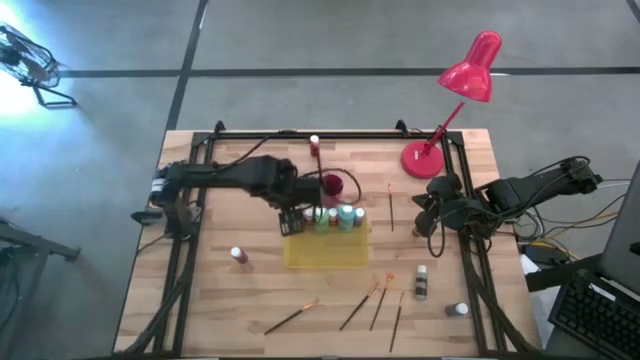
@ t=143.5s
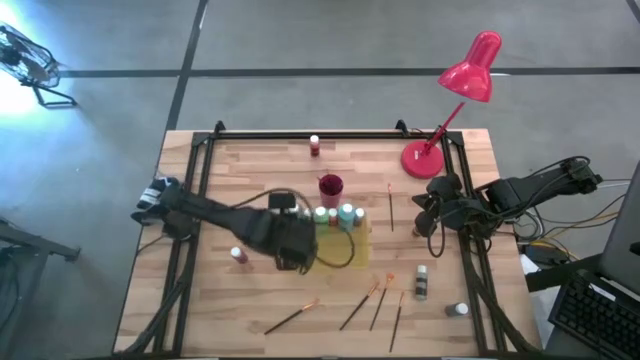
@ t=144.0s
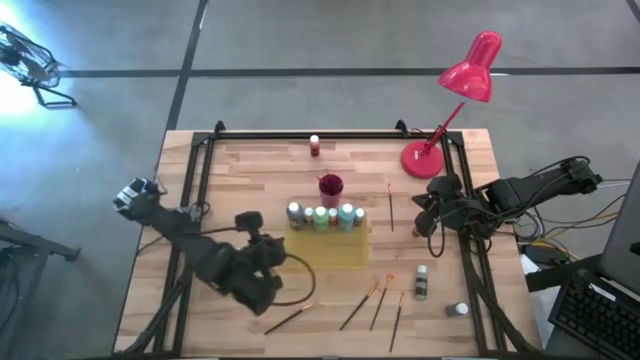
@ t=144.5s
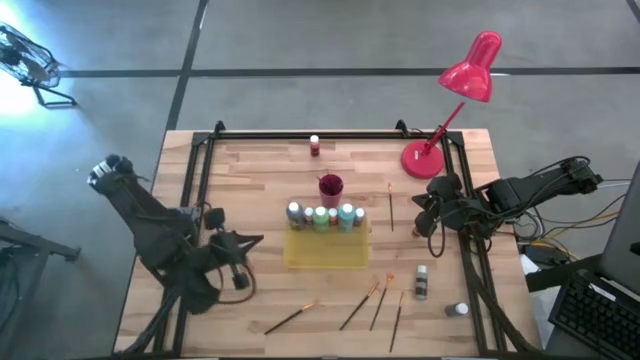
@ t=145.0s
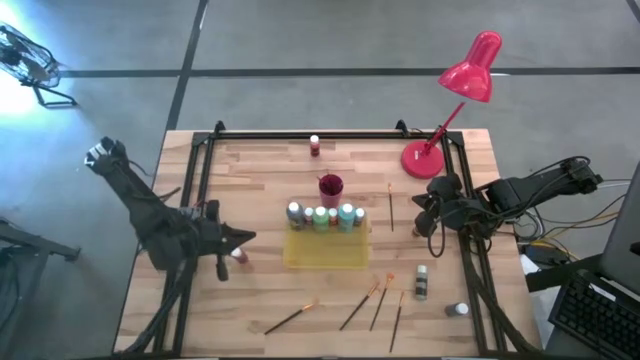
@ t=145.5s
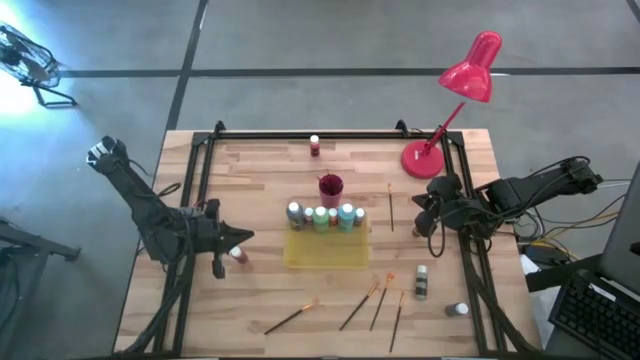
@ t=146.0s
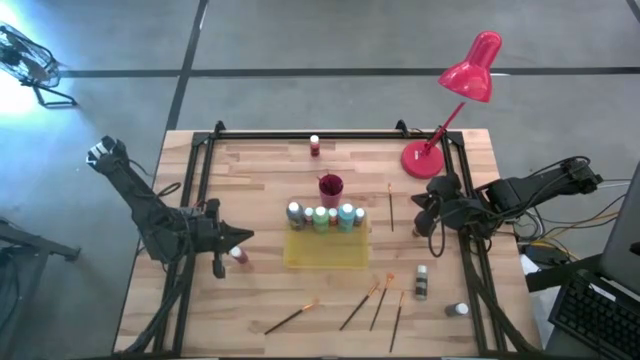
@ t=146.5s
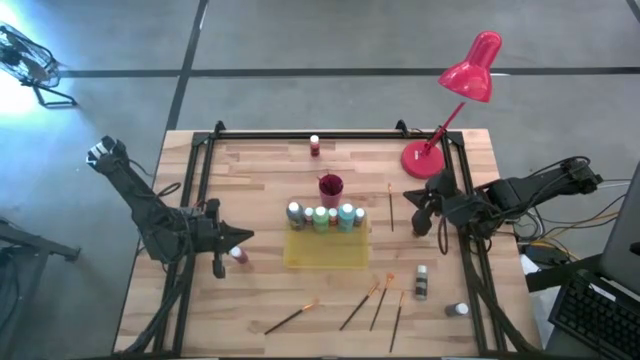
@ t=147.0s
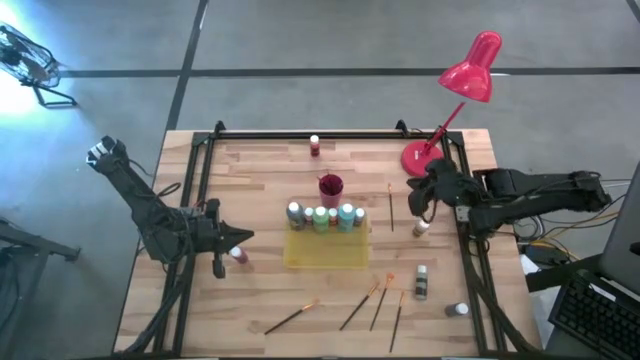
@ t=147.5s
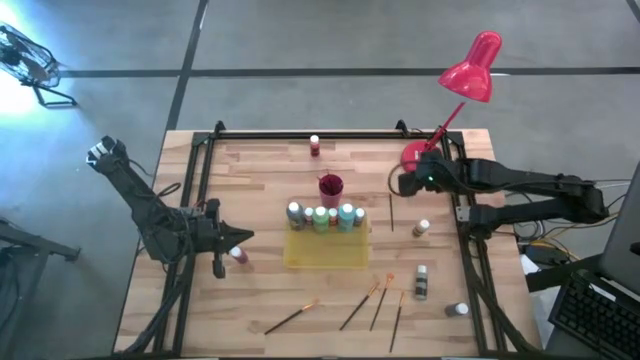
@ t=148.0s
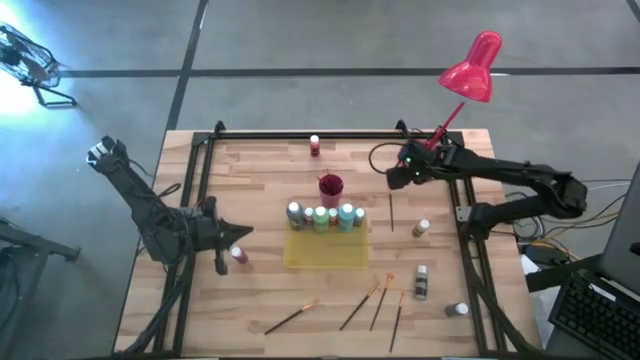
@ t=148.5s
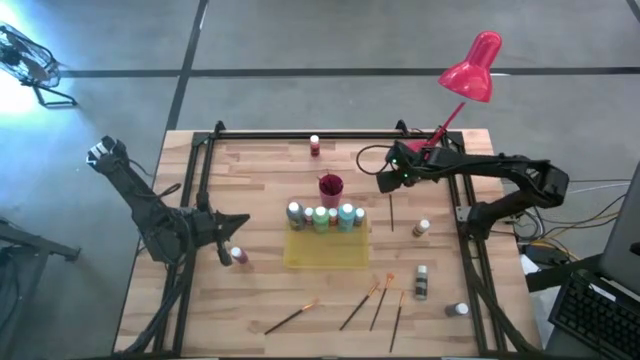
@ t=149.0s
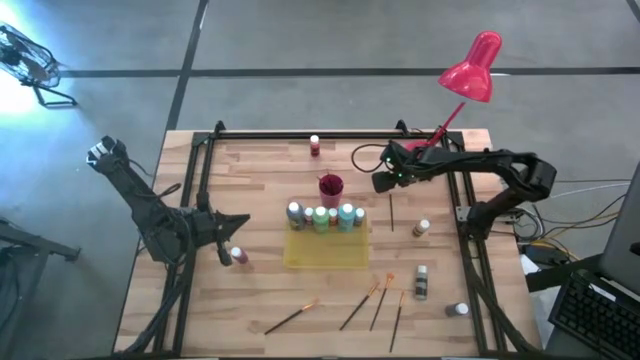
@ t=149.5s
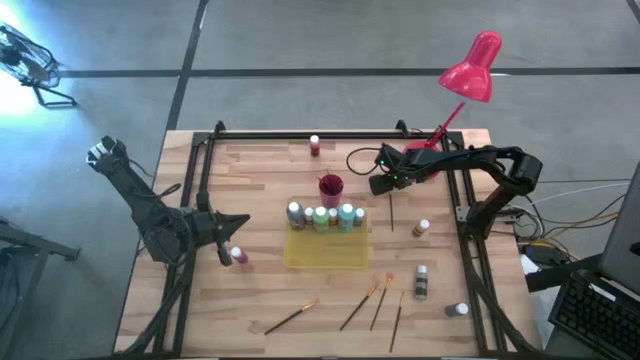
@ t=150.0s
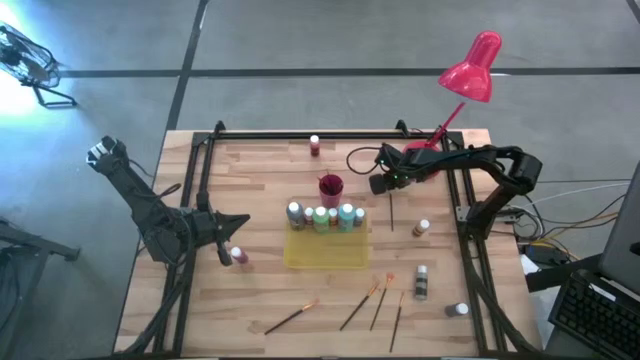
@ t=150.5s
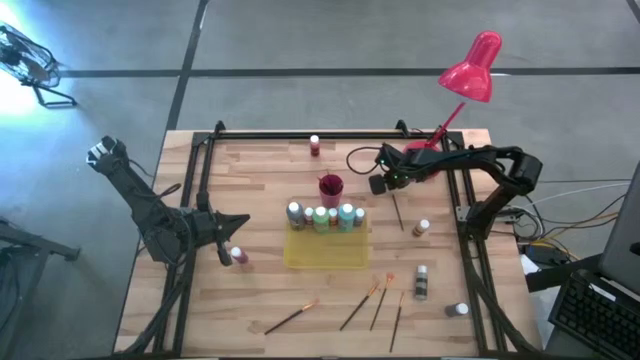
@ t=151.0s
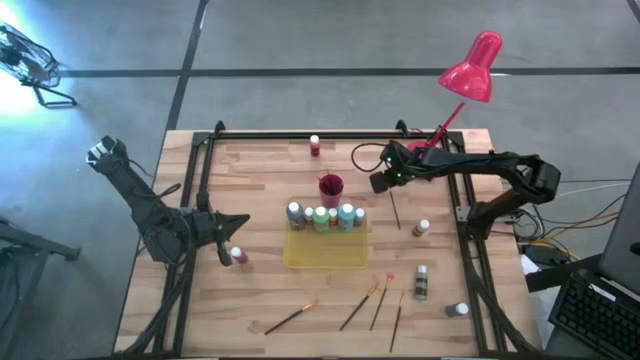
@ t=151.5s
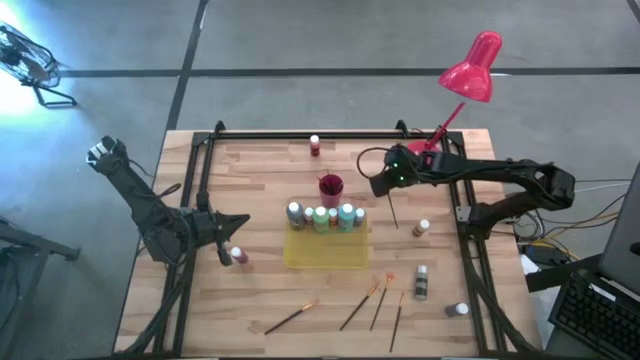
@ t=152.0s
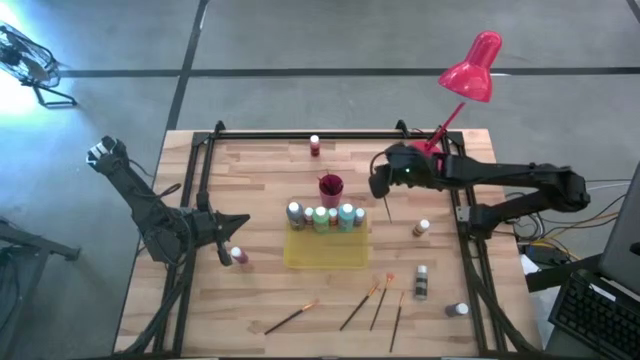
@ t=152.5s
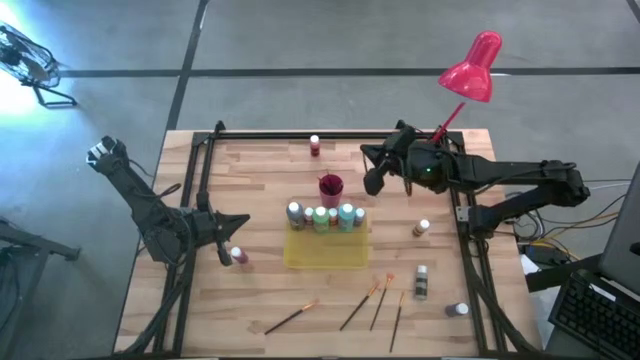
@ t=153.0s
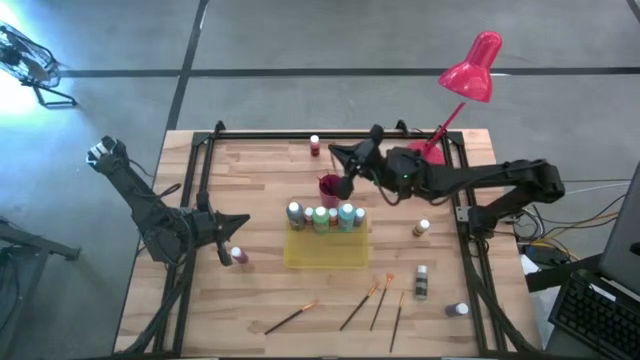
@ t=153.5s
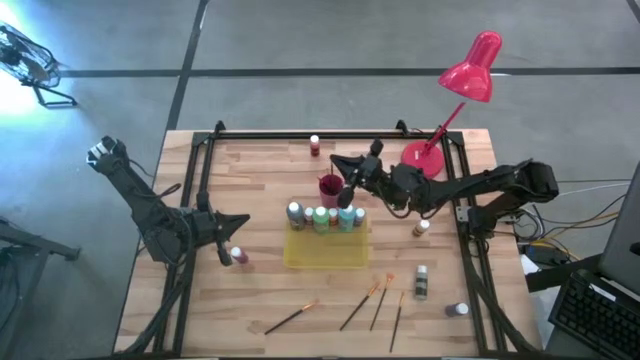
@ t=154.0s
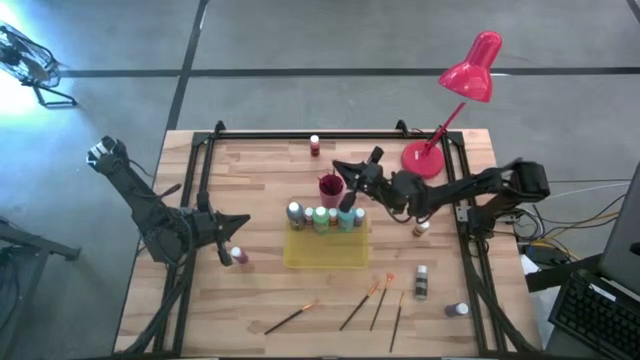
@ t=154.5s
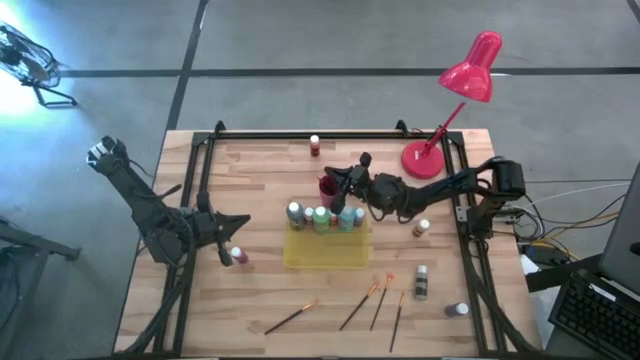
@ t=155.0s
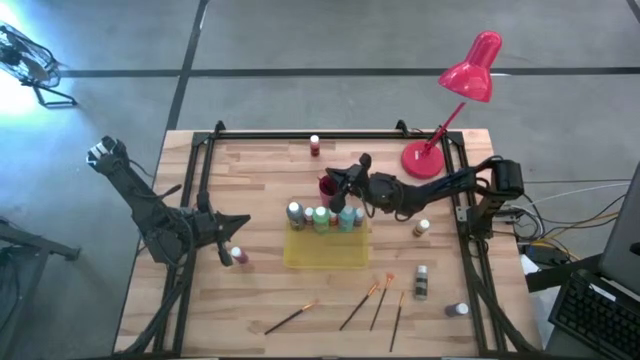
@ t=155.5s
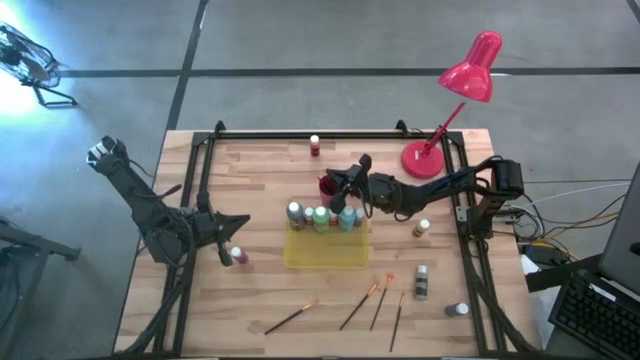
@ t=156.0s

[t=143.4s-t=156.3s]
Task: Pick & Place Paint Supplies
Put the gold paint brush into the pink cup

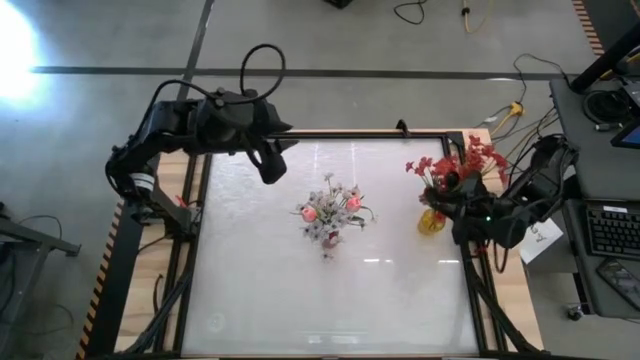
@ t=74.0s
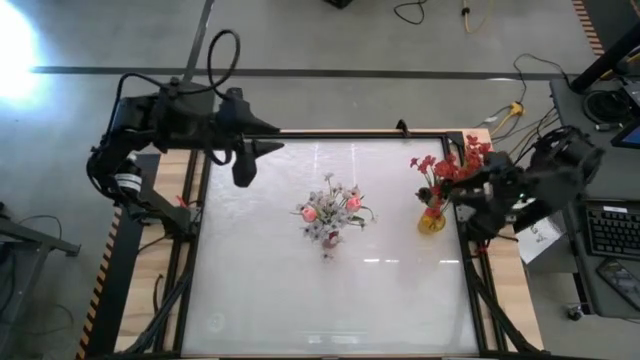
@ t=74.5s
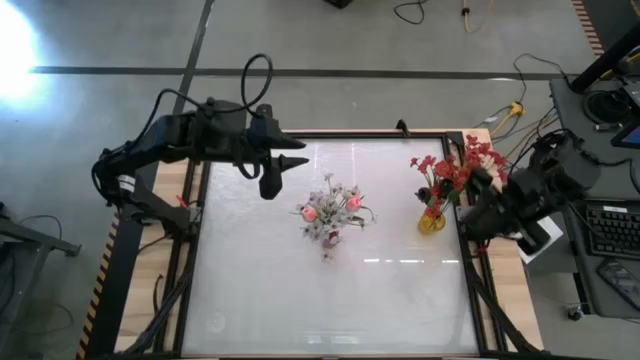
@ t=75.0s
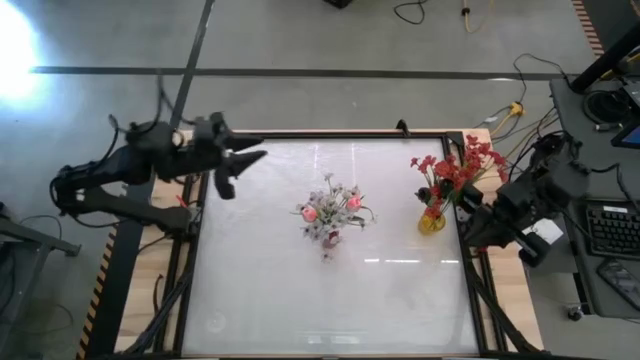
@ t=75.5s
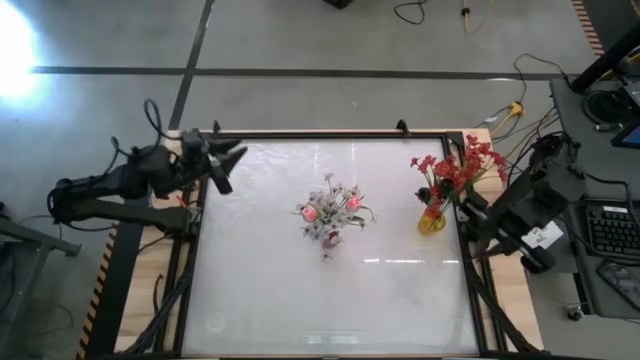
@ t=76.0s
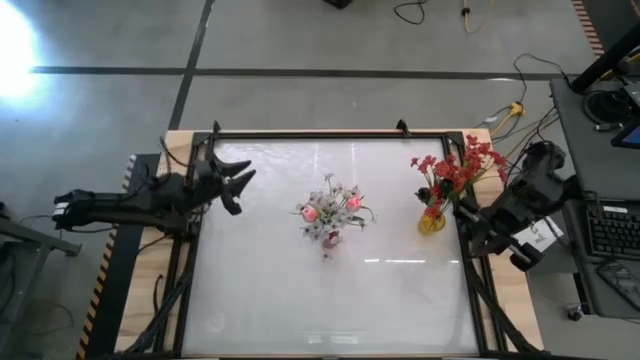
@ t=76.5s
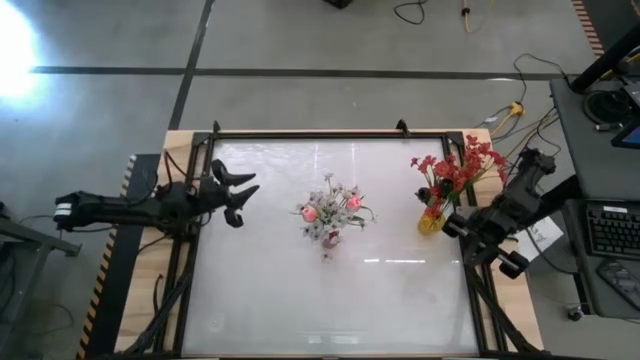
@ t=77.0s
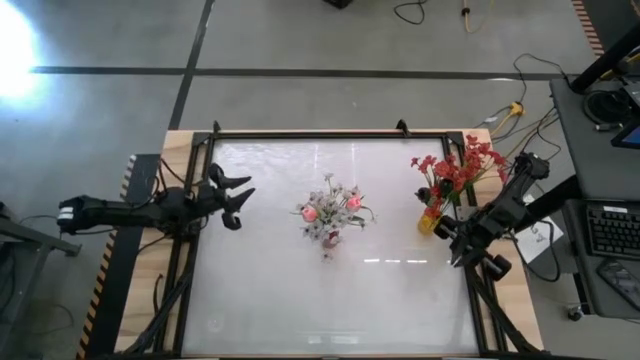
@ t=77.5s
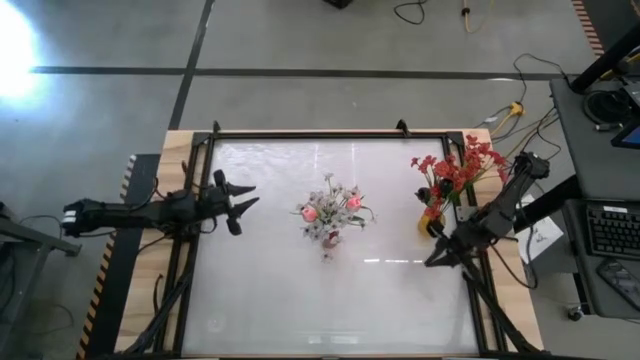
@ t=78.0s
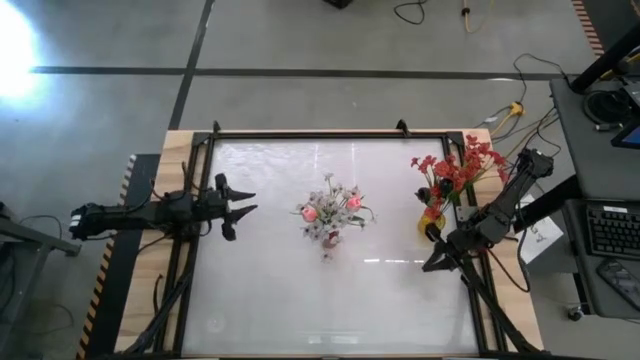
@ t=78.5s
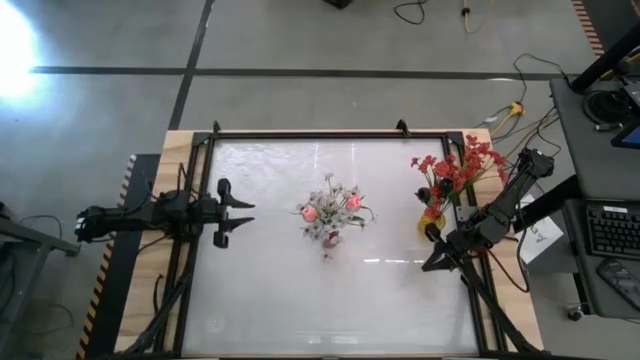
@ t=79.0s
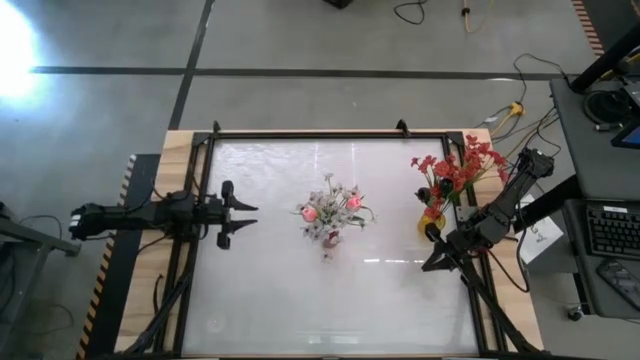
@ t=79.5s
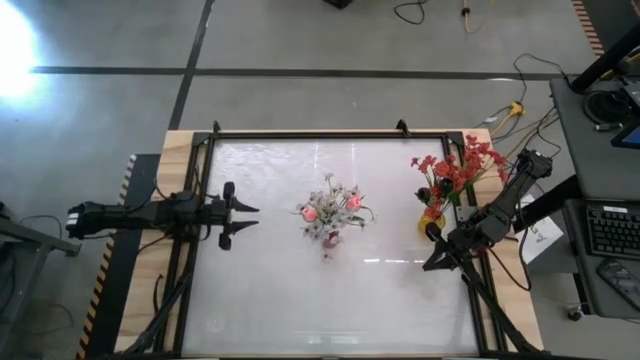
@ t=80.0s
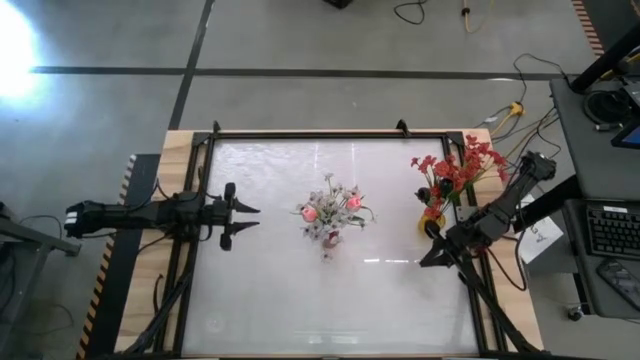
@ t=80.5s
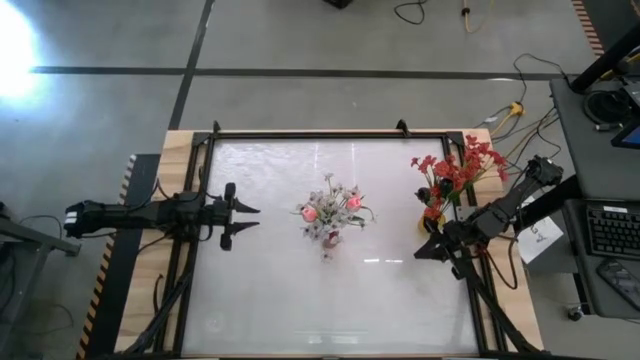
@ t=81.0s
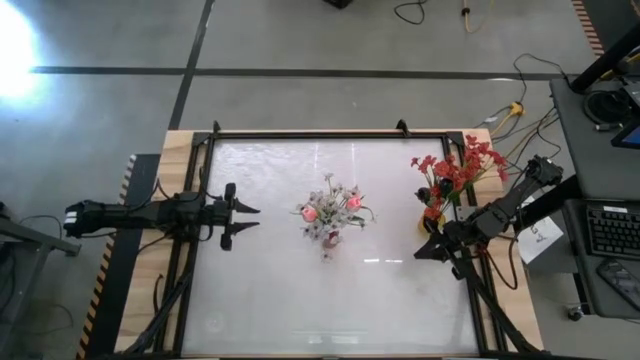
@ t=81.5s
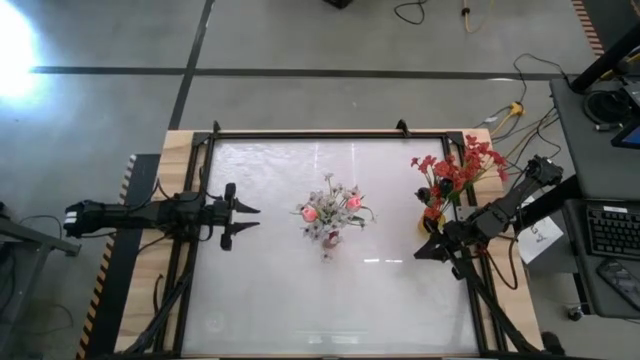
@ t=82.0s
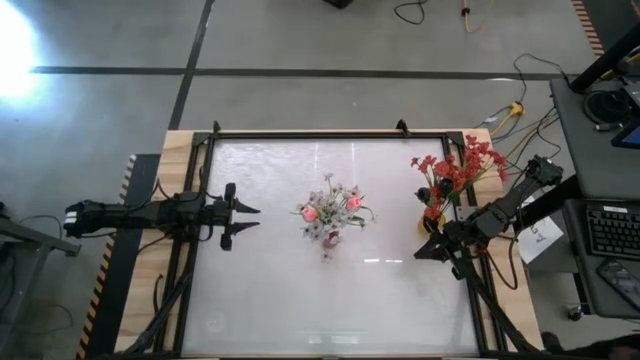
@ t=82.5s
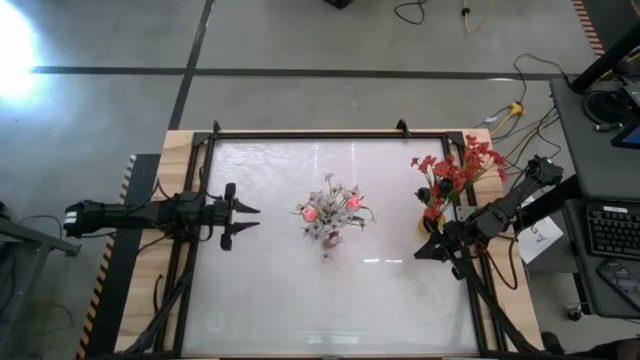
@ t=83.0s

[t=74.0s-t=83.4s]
Task: Sort flowers into vase by color
Return to Home Position
